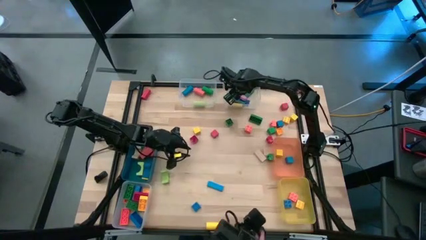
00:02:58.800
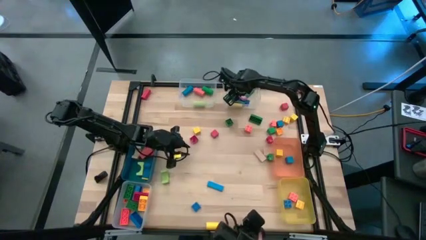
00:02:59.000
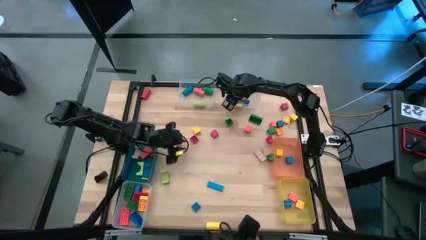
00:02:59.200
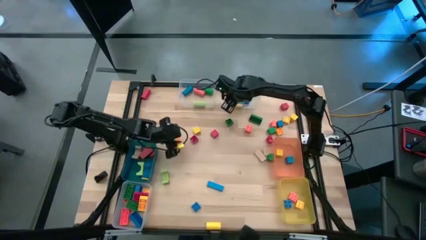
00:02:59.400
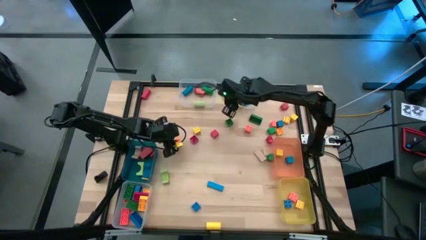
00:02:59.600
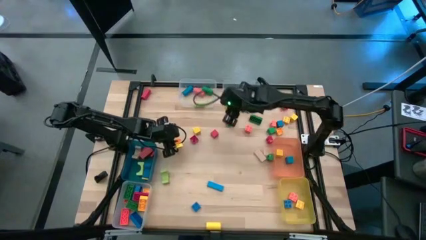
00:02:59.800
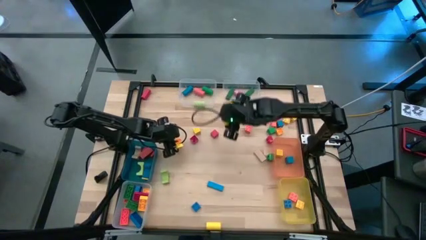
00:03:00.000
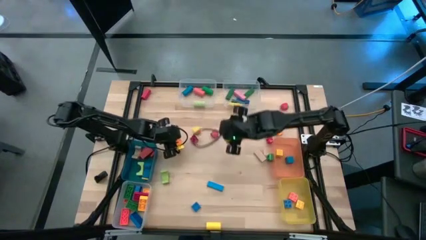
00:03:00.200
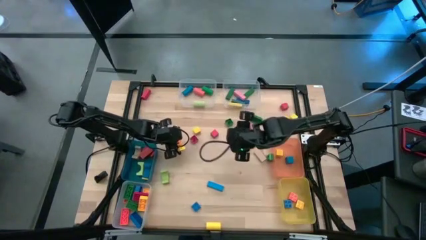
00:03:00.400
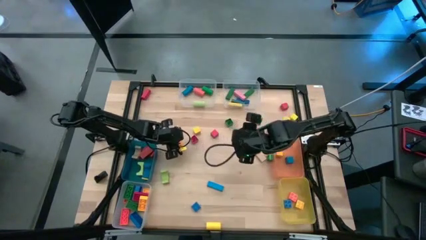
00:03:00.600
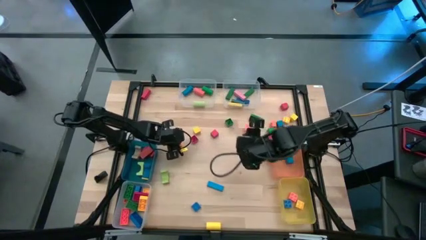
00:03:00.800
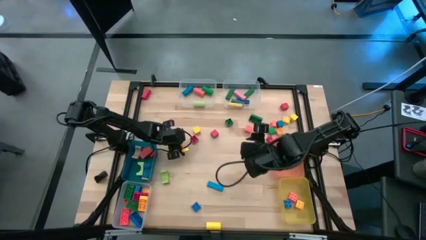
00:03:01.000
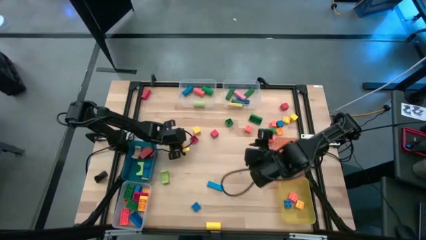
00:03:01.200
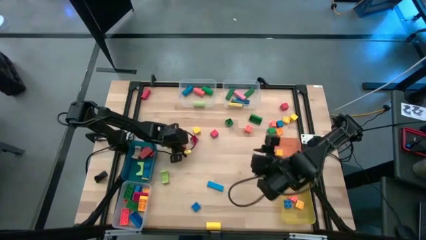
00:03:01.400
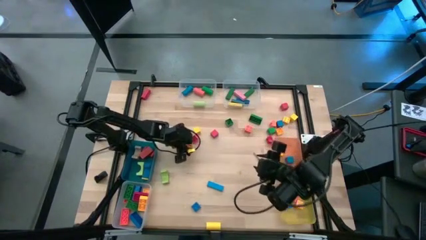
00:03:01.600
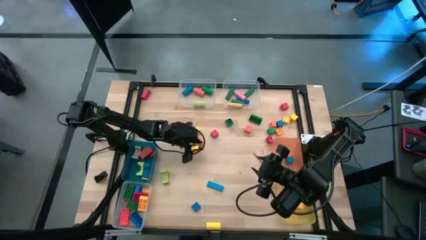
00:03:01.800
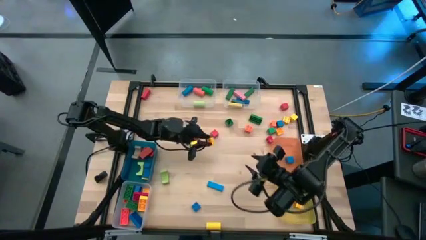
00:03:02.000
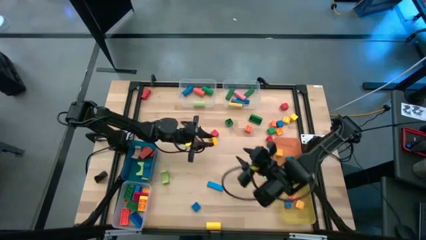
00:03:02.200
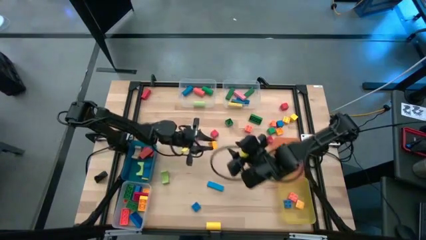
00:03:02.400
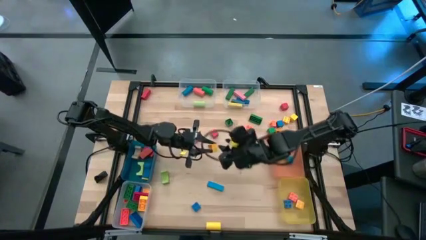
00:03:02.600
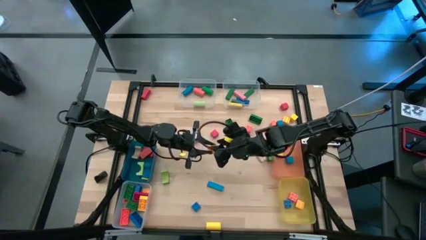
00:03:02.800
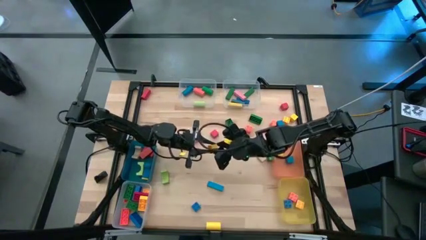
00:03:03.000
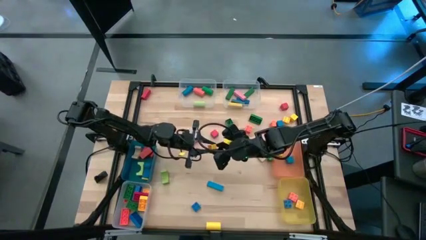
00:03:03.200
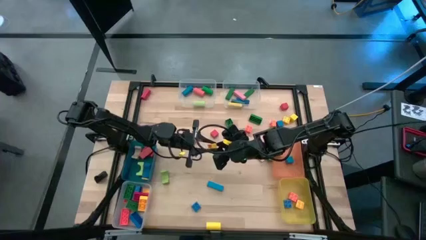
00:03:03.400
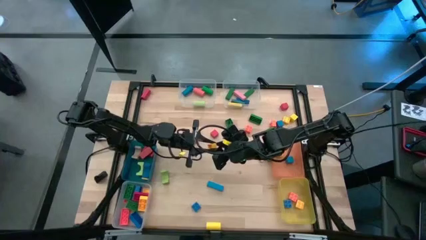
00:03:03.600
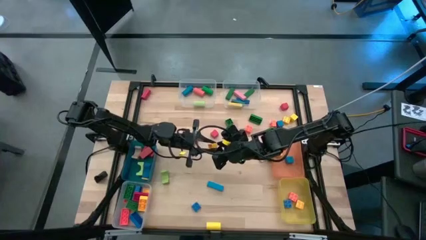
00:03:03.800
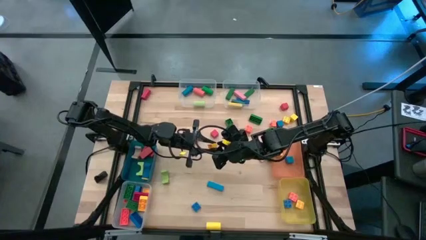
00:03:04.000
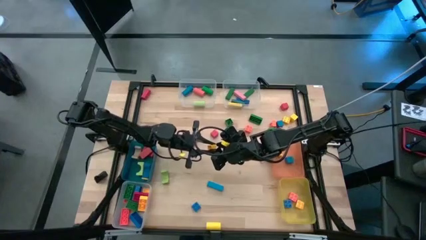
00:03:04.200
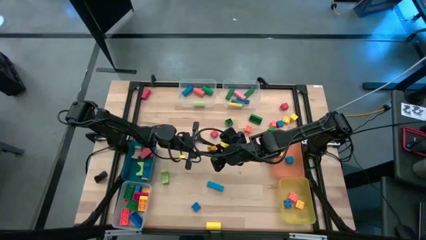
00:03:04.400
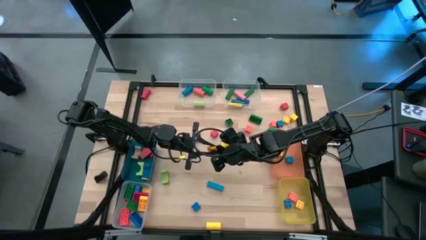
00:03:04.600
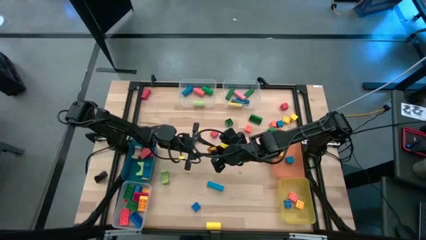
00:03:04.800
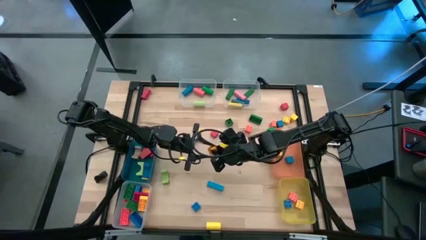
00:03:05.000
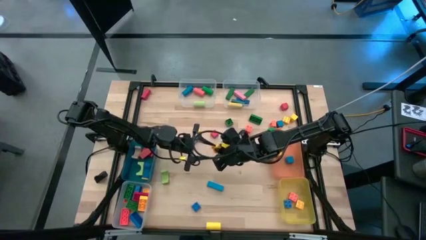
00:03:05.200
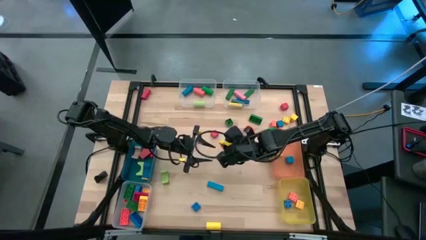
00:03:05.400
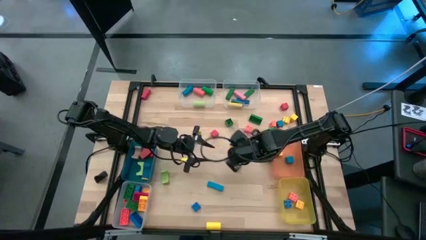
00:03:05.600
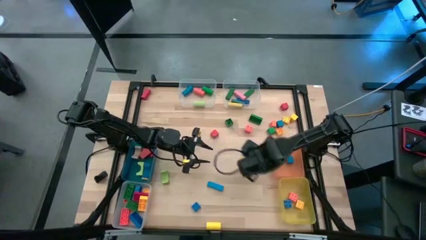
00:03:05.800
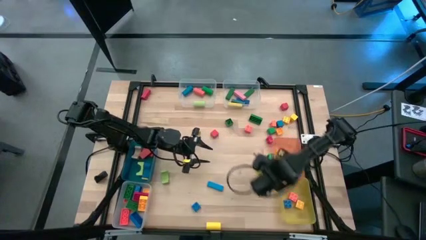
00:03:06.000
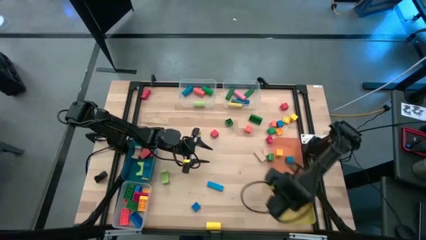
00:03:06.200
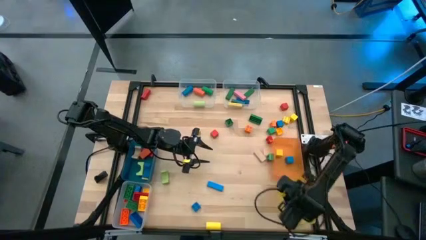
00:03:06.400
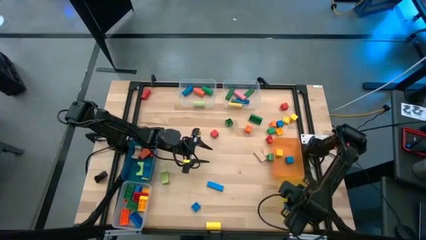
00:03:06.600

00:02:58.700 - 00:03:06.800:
Task: Sort blocks by size
Put the yellow game piece into the yellow bin

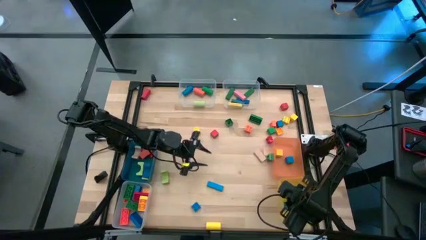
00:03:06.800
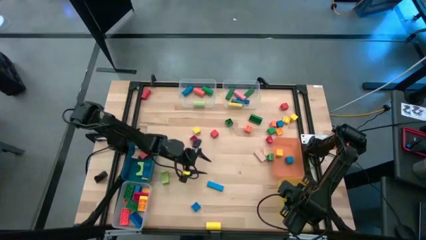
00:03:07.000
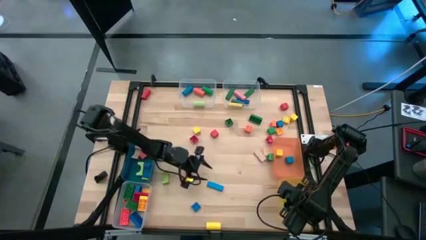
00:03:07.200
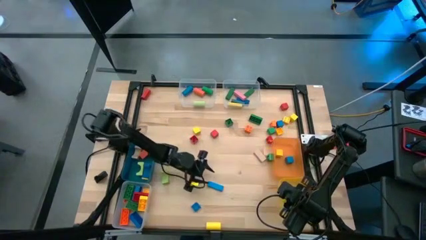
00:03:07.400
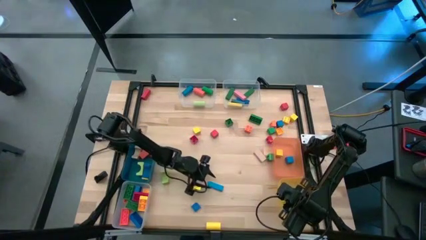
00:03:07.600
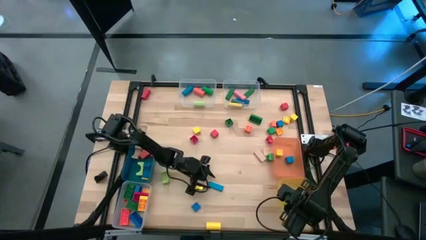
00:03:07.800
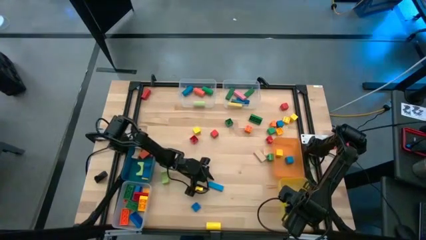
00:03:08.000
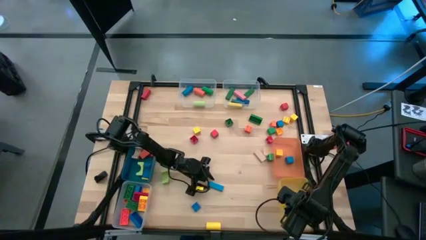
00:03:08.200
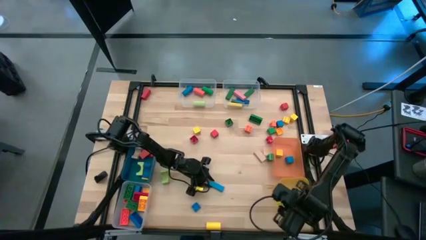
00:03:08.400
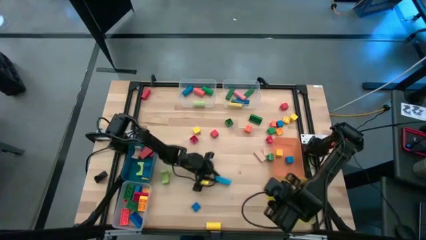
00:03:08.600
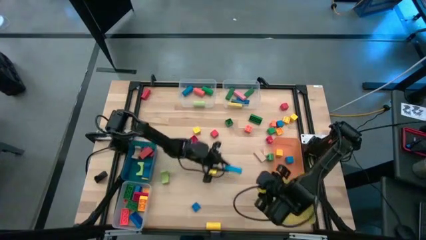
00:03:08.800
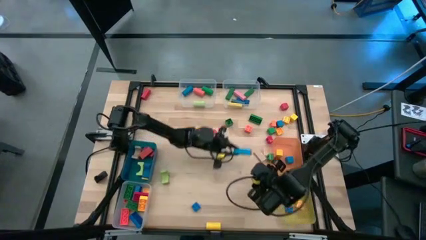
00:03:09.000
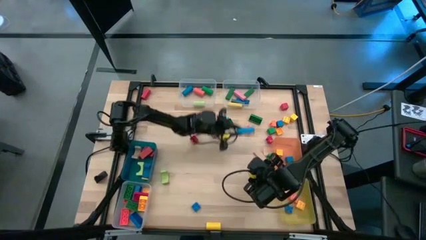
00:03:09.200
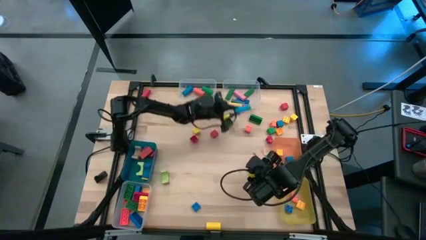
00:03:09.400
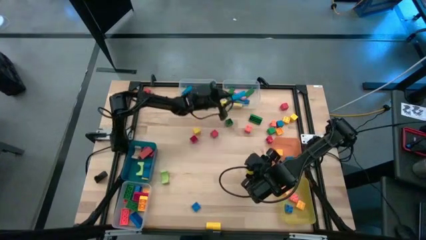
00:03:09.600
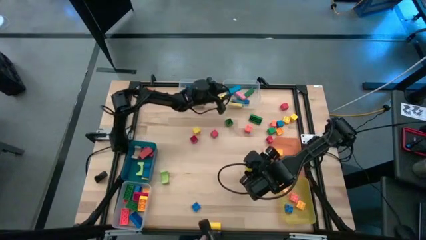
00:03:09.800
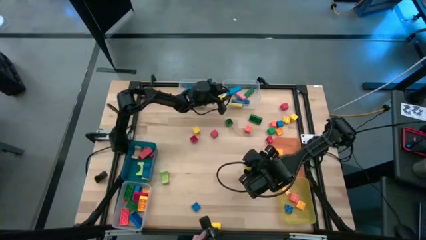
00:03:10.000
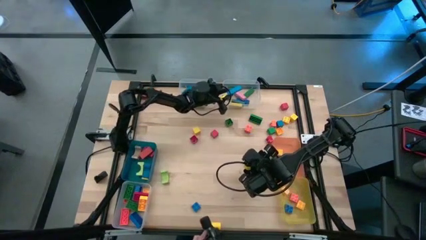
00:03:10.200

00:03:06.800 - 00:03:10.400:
Put the blue block into the top right transparent bin

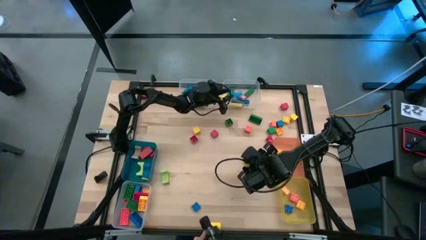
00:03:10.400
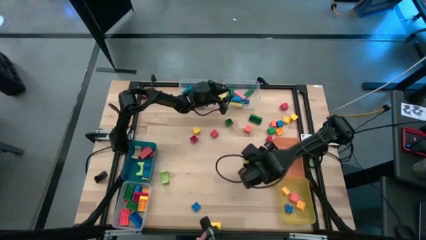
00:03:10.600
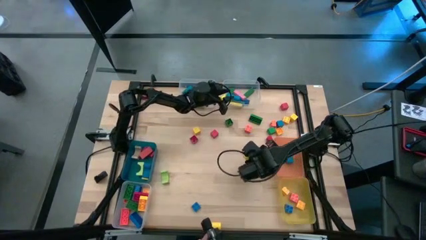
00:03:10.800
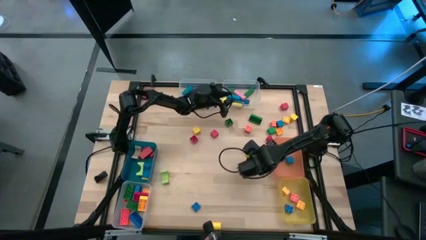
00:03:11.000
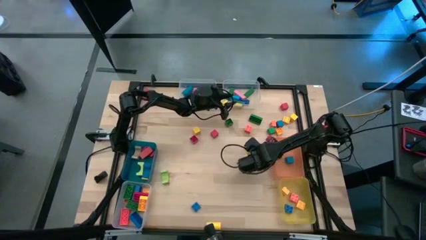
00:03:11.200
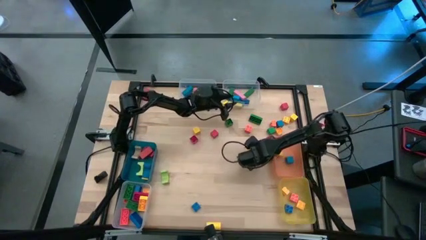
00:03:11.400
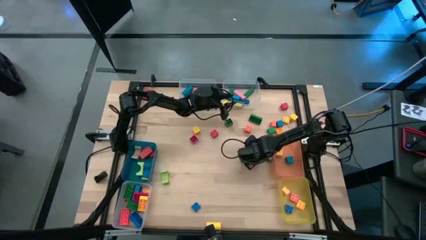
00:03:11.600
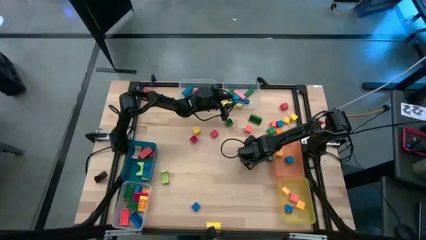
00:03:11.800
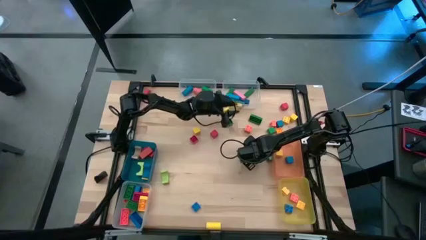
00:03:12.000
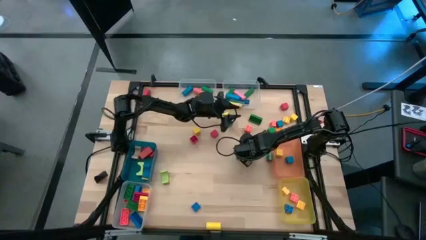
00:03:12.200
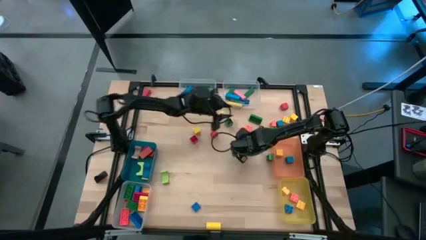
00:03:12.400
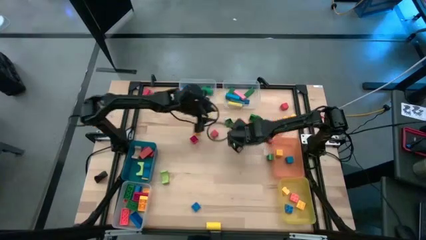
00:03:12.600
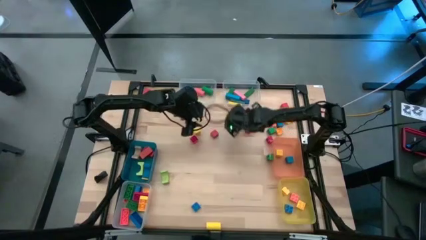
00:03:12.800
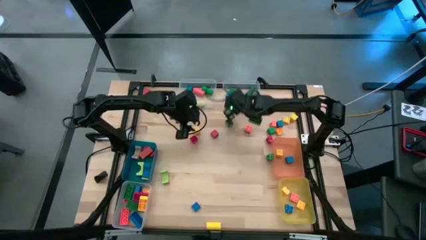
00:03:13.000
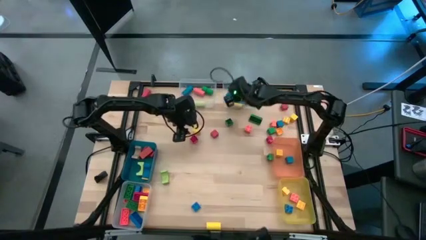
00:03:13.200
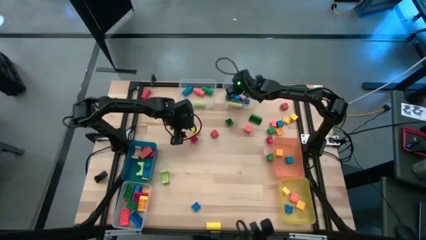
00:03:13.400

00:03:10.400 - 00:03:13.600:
Put the brown block into the top right transparent bin

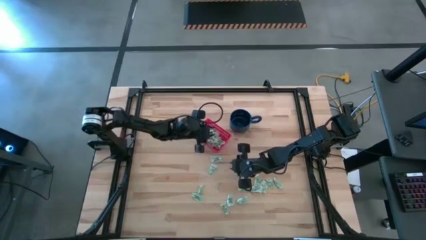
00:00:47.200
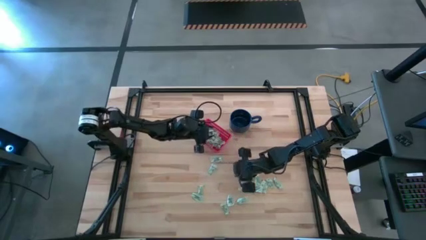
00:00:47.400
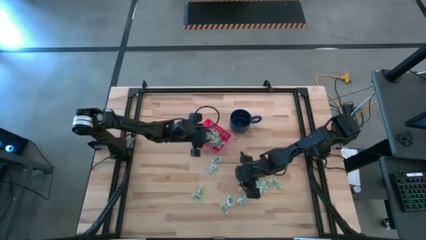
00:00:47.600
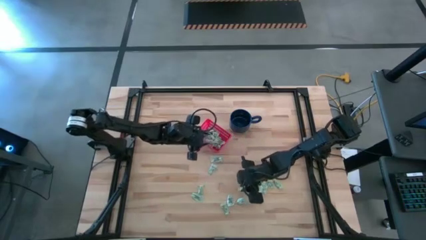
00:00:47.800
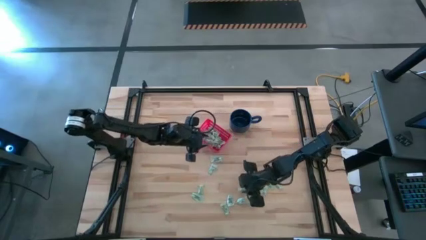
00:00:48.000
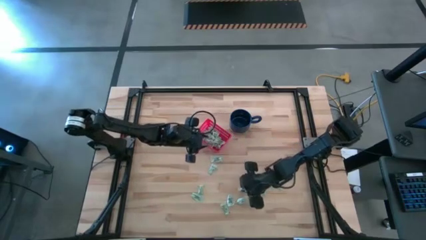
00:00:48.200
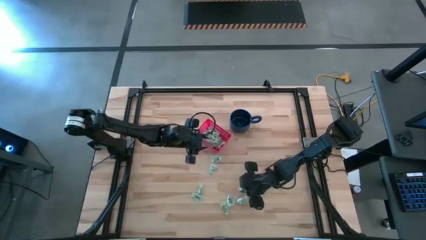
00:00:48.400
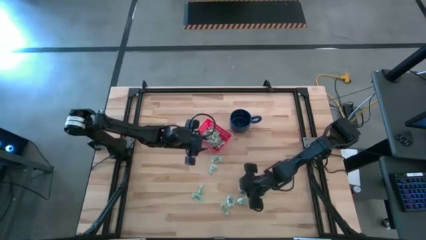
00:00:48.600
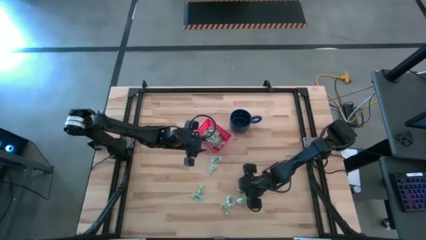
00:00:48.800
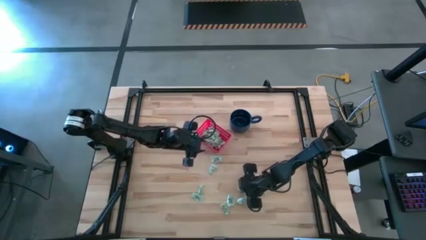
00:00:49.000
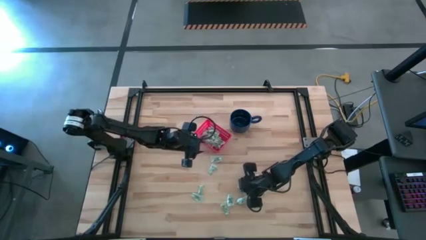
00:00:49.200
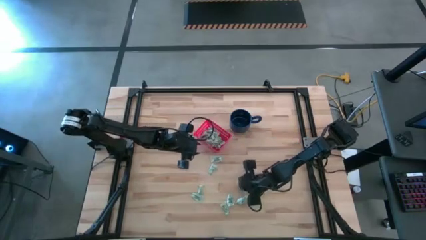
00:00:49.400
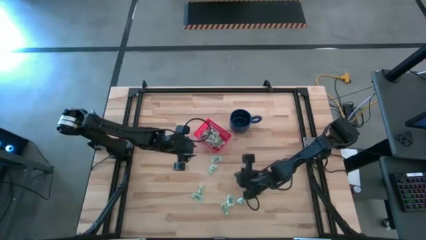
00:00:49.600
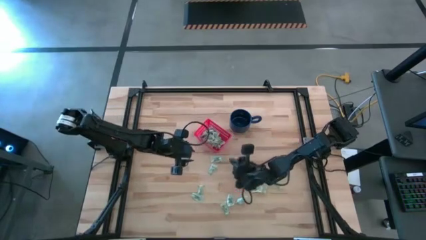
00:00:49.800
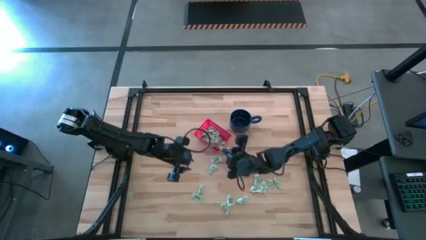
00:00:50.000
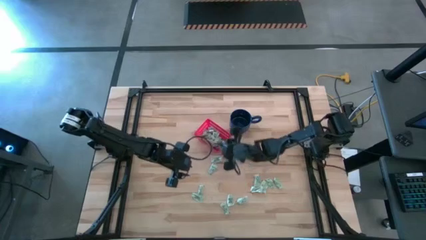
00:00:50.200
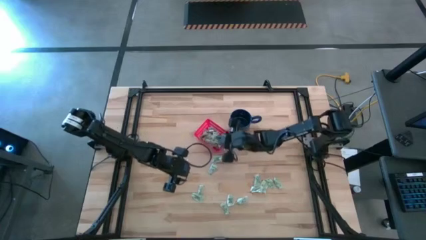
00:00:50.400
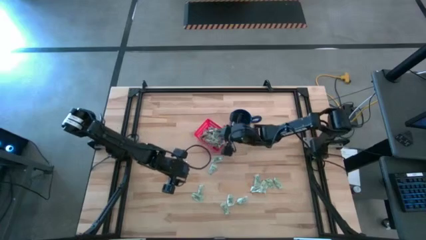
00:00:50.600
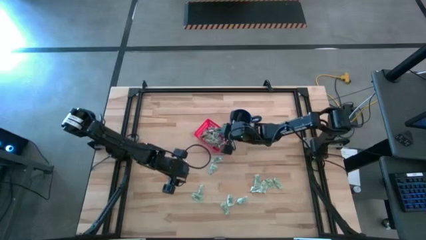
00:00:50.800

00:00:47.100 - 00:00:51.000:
Task: Pick and place items into bin
Put the stevia packet into the bin
